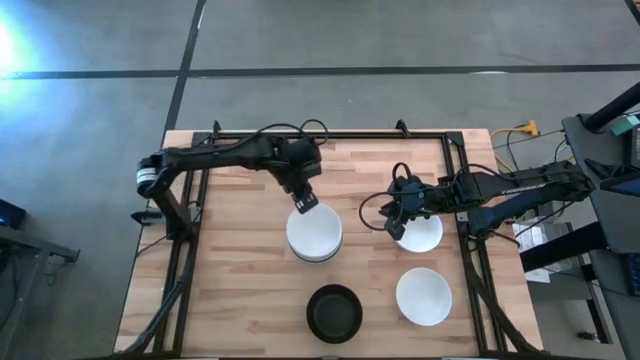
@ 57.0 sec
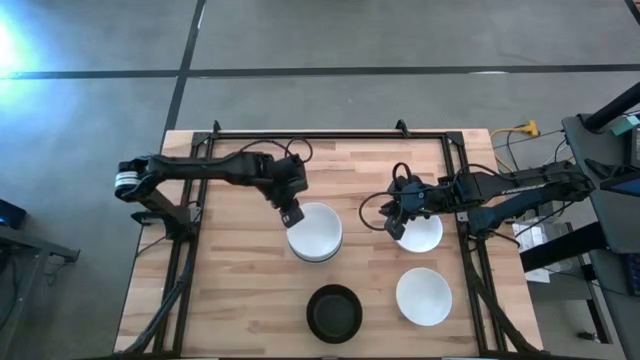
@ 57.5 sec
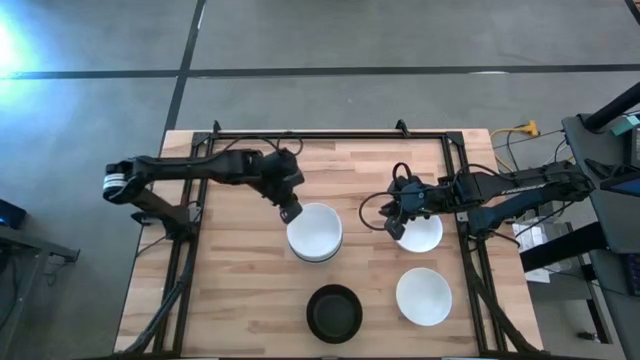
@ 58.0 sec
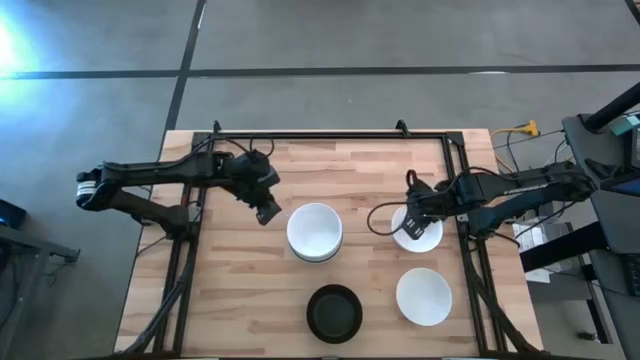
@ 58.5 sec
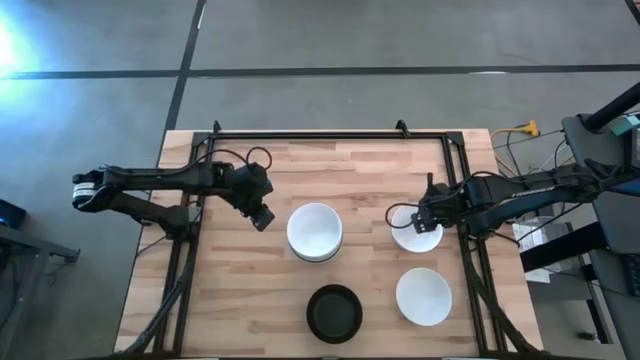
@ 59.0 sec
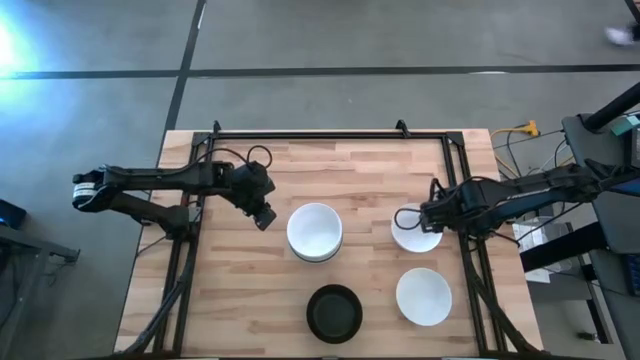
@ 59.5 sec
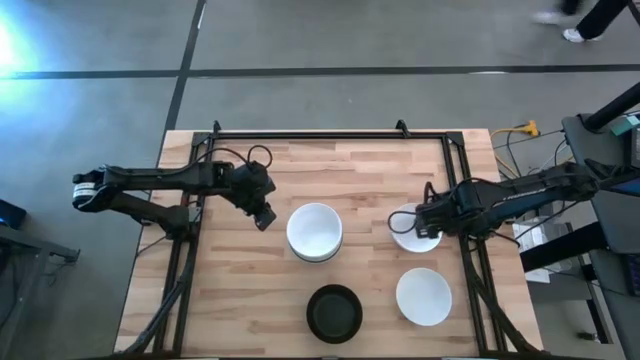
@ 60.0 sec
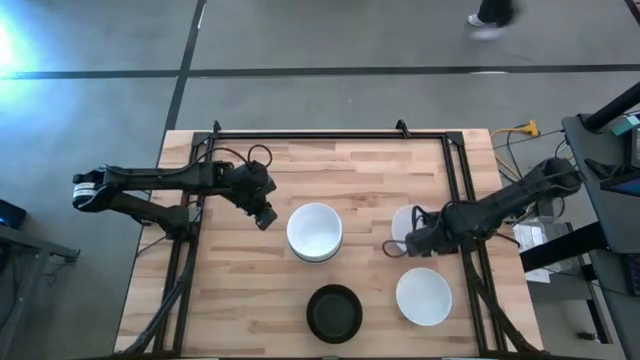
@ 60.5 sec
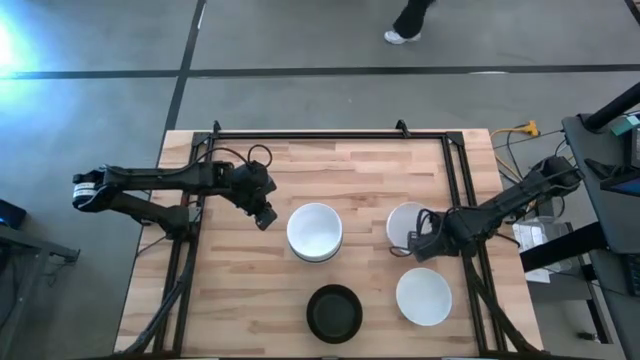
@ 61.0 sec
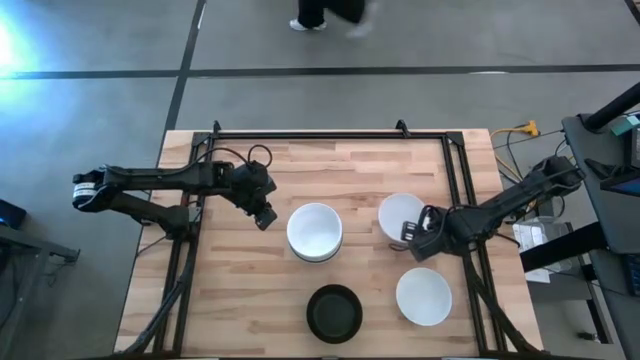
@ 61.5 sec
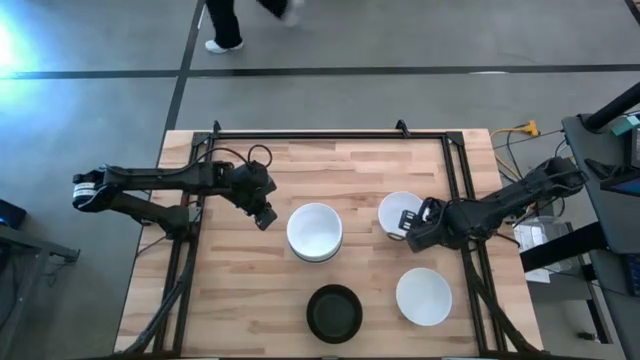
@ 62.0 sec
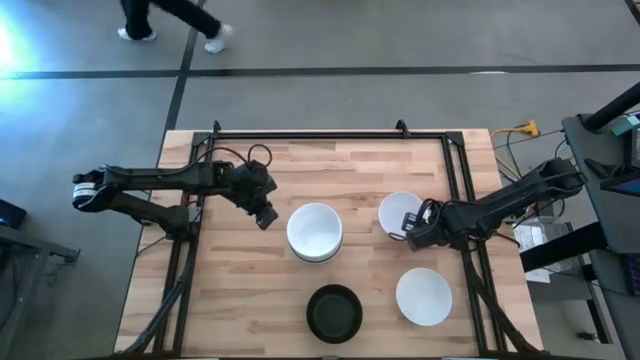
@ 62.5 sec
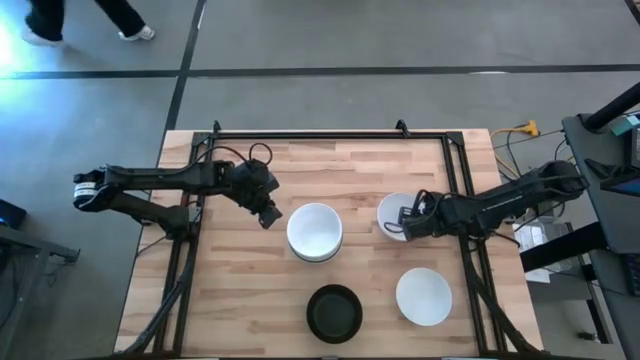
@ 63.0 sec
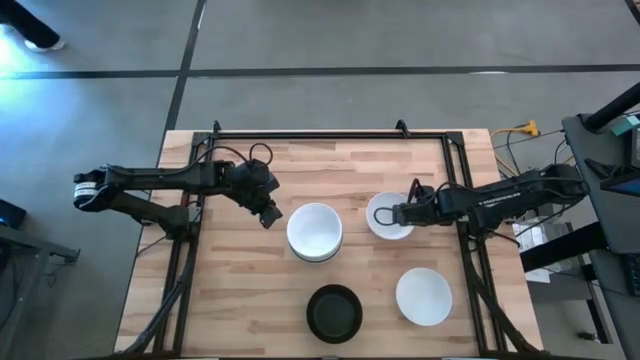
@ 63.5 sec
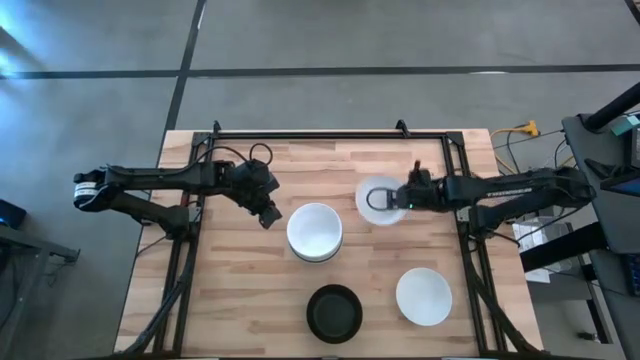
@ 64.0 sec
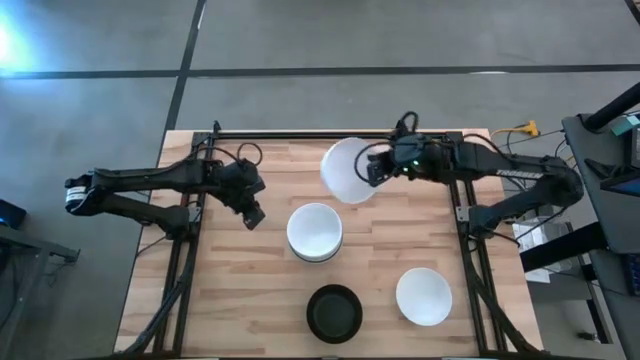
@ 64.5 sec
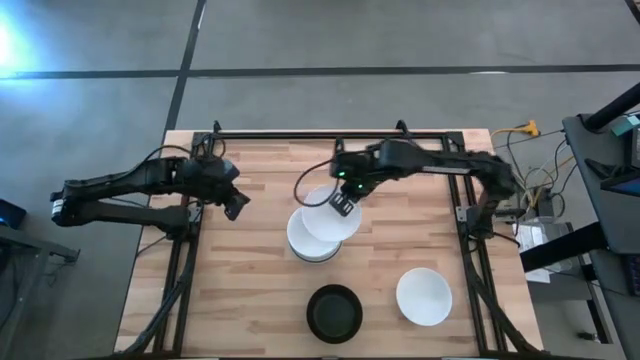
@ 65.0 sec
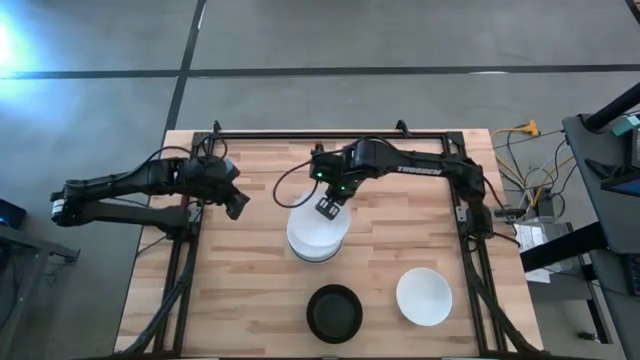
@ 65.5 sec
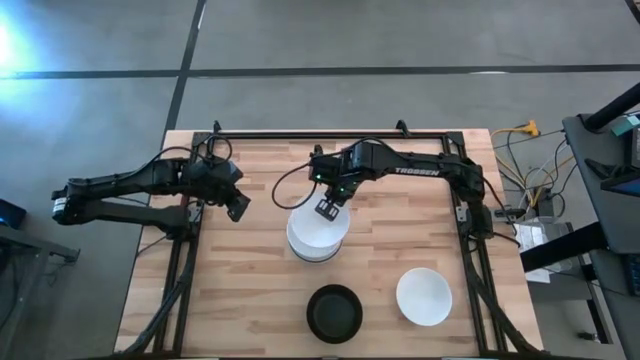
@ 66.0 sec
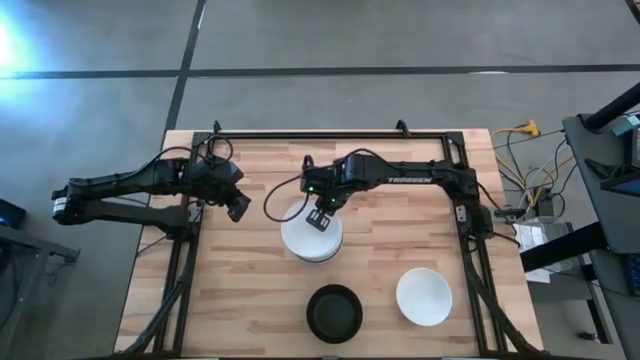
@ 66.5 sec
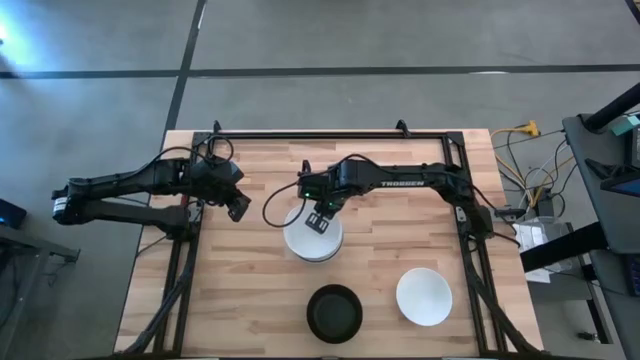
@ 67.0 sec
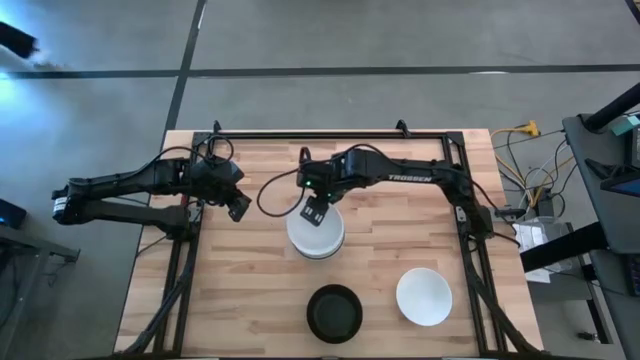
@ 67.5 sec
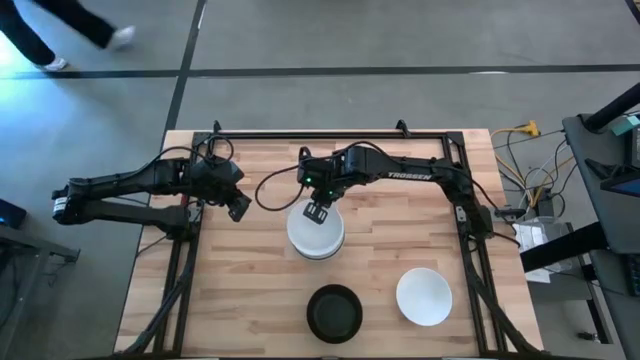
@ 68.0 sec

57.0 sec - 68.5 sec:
Task: Nest bowls inside each other
Stack the white bowl on top of the other white bowl

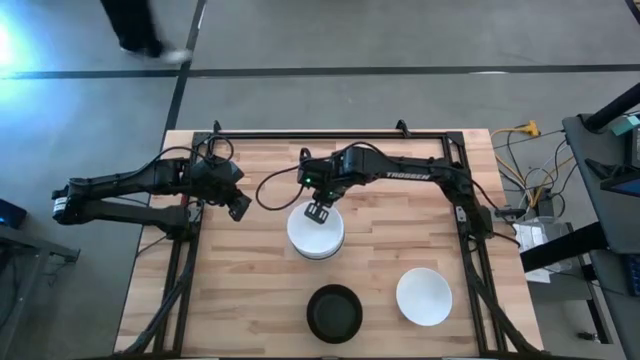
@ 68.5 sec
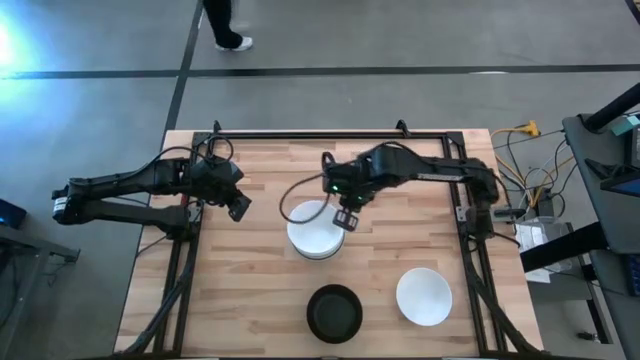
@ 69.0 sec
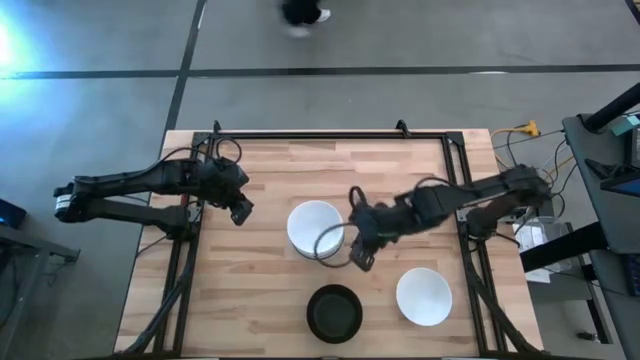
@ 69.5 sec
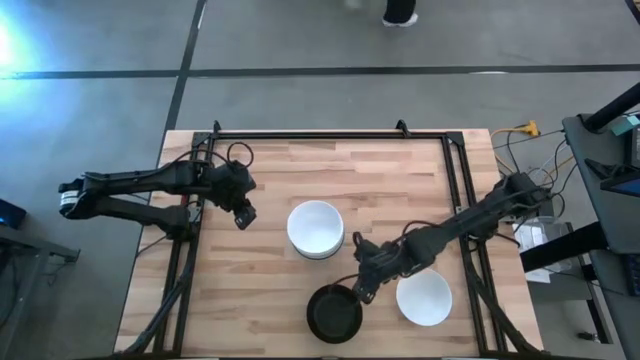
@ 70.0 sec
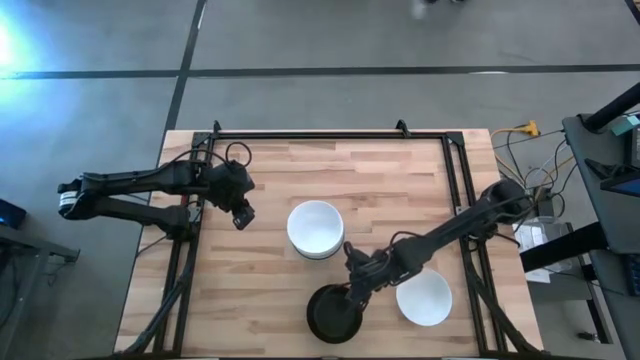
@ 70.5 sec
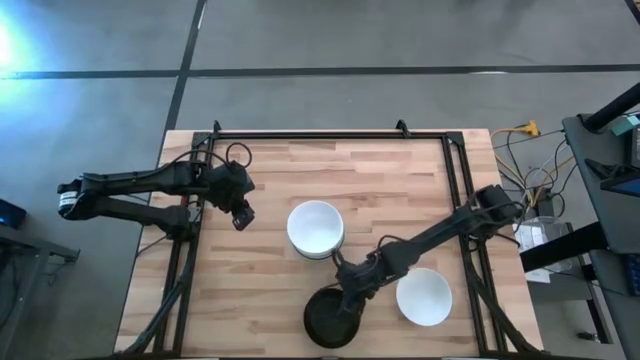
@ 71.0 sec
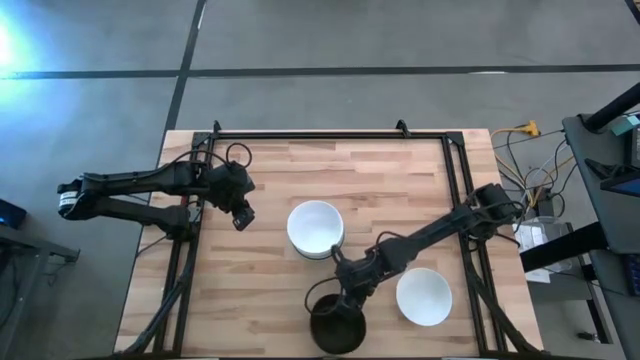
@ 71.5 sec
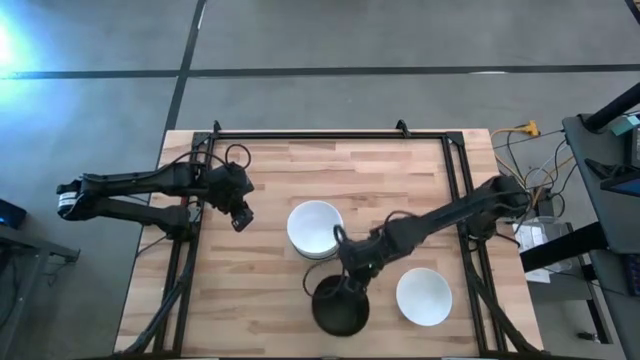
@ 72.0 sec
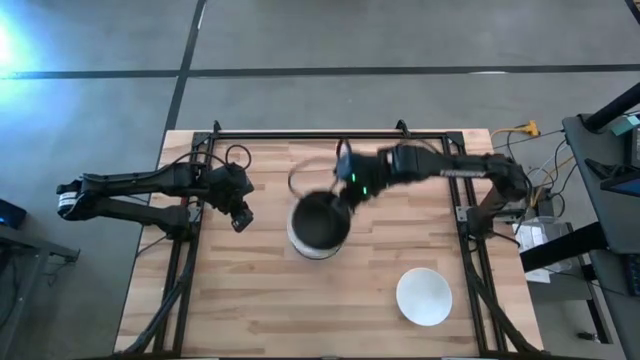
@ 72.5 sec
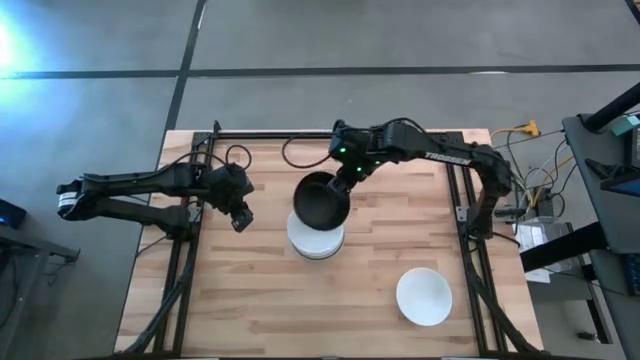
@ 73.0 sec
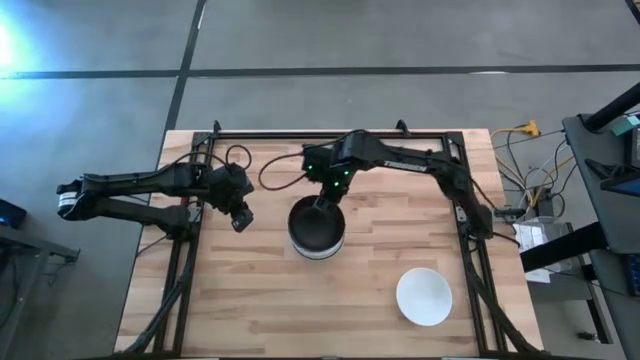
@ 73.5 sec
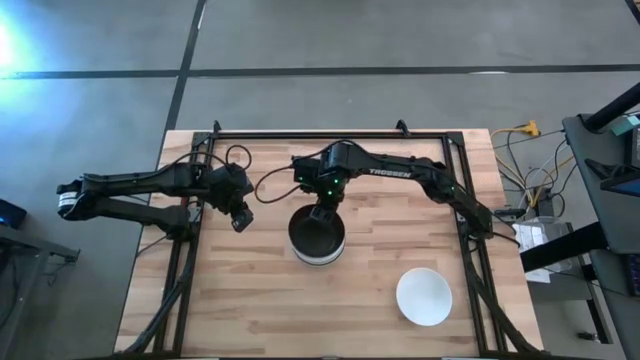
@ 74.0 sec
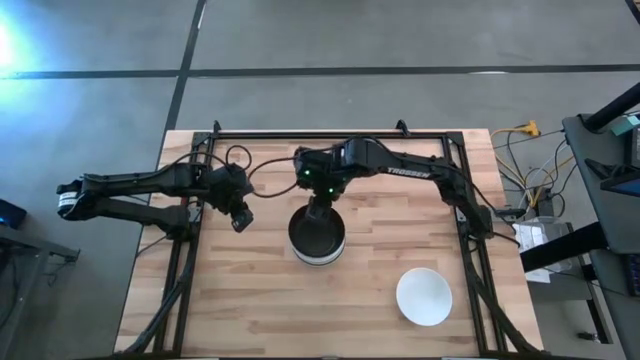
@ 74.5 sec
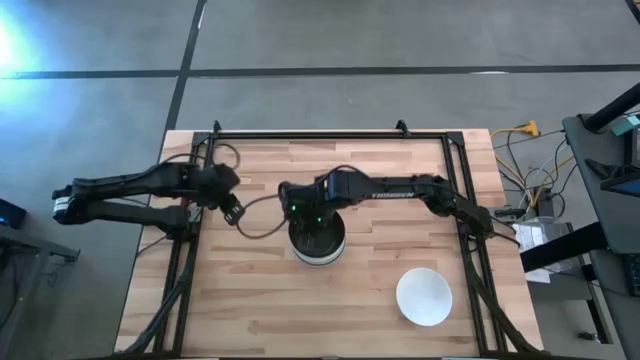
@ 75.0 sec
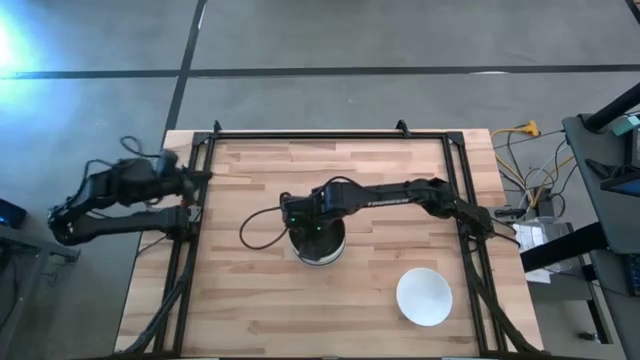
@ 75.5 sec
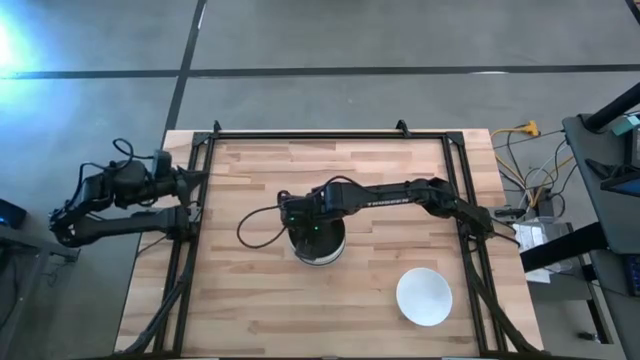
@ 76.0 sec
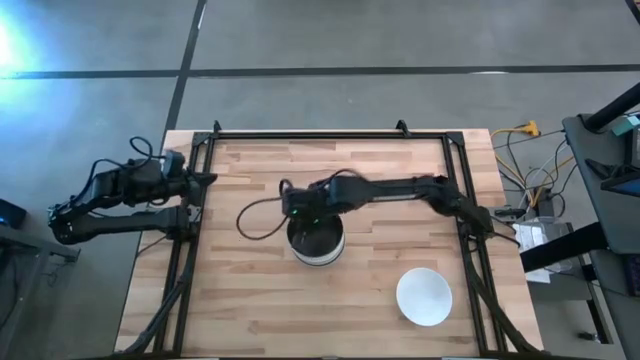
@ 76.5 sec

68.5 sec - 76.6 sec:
Stack the black bowl on top of the white bowl

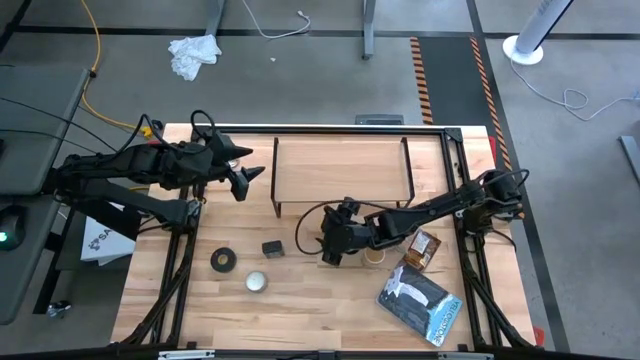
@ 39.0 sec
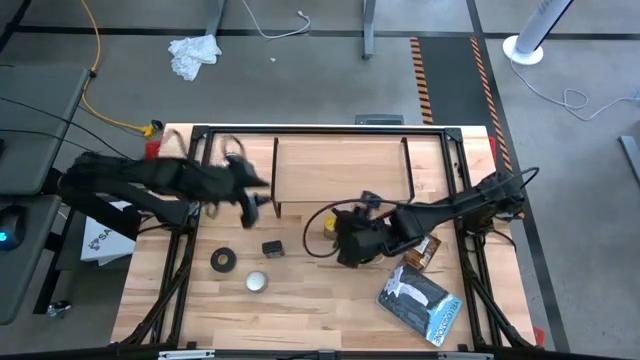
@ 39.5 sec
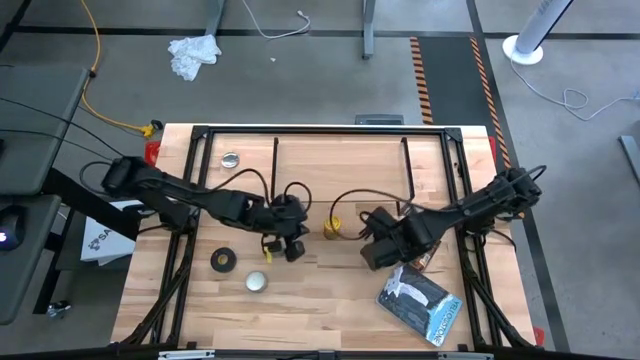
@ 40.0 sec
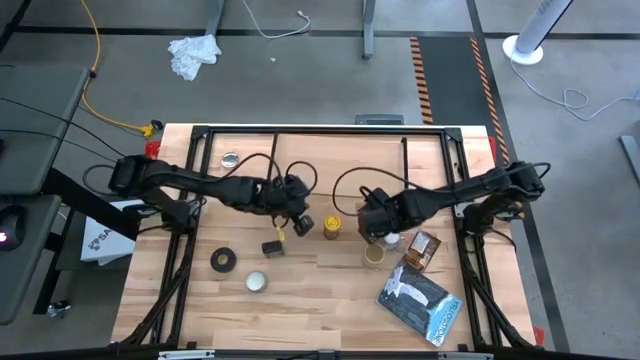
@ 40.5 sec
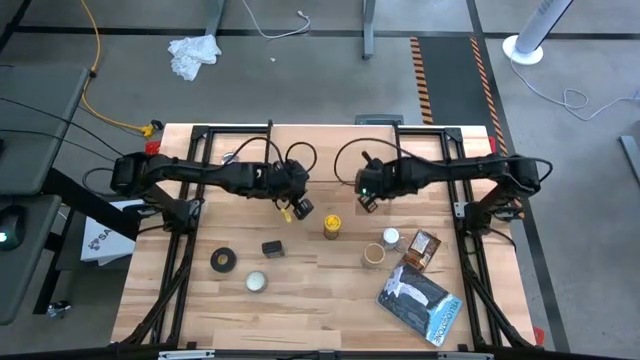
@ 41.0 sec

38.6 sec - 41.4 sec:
Task: Shelf spices
Adjust the shelf
